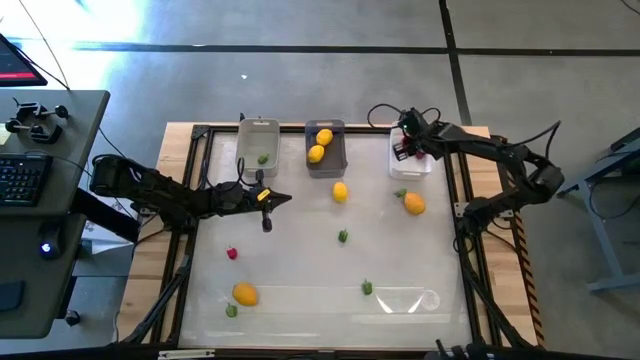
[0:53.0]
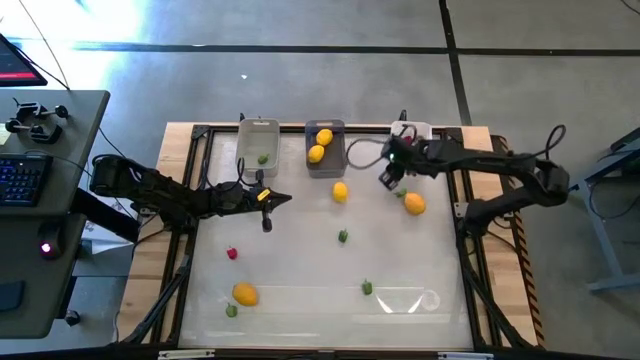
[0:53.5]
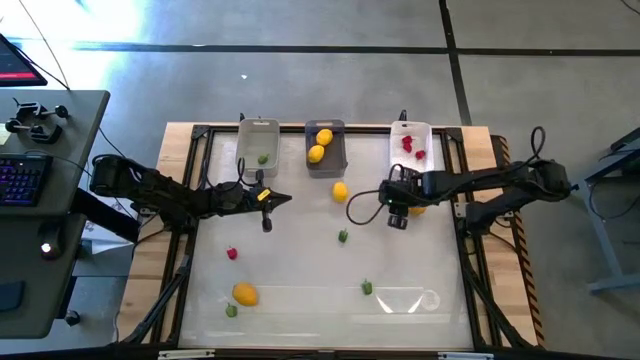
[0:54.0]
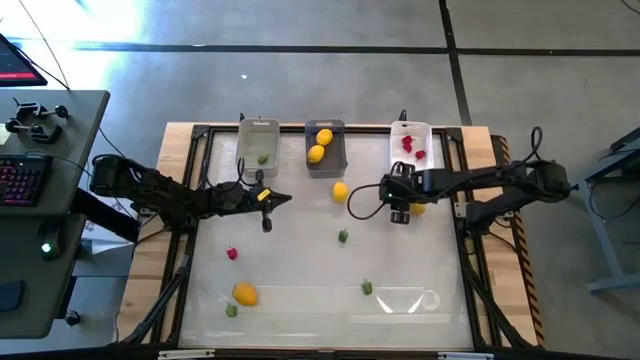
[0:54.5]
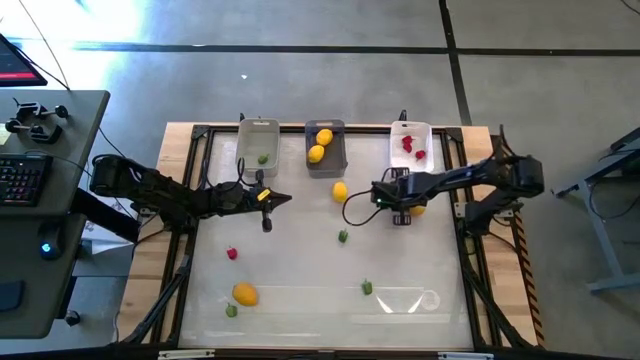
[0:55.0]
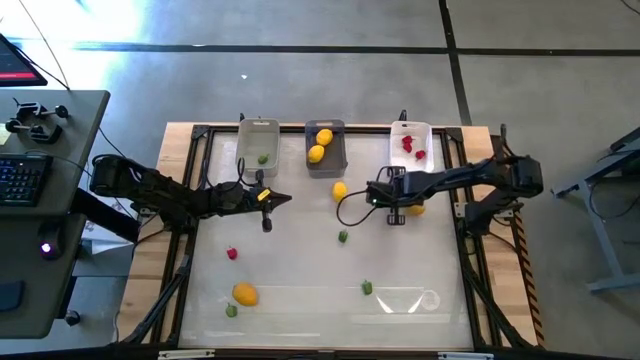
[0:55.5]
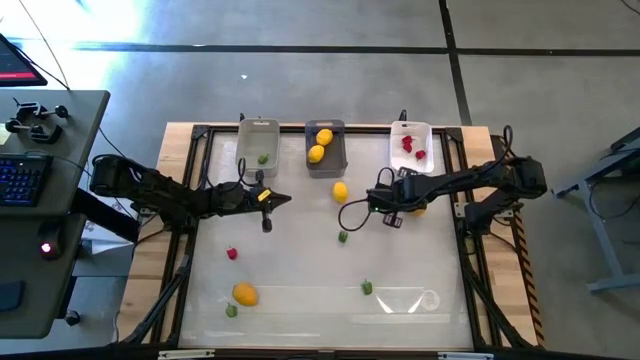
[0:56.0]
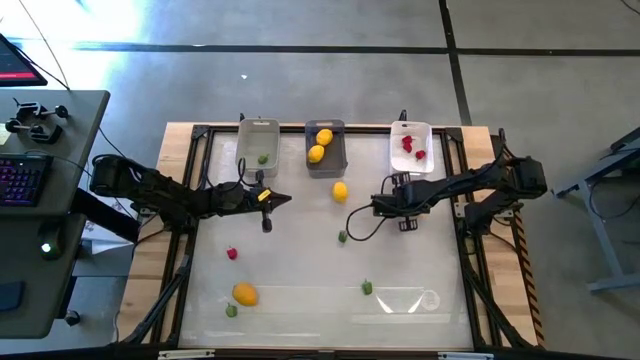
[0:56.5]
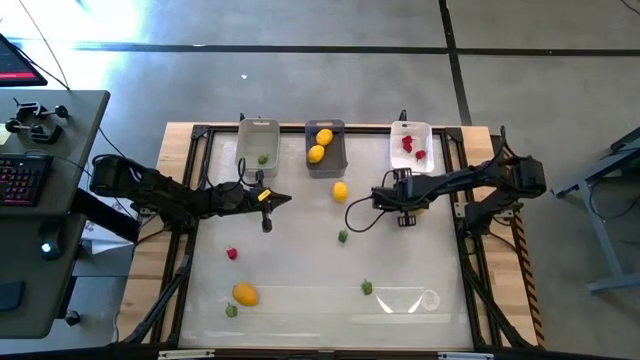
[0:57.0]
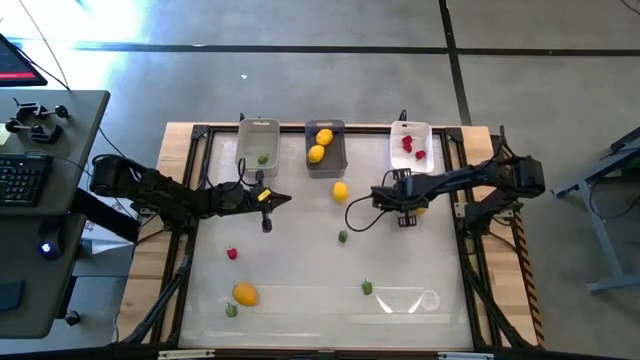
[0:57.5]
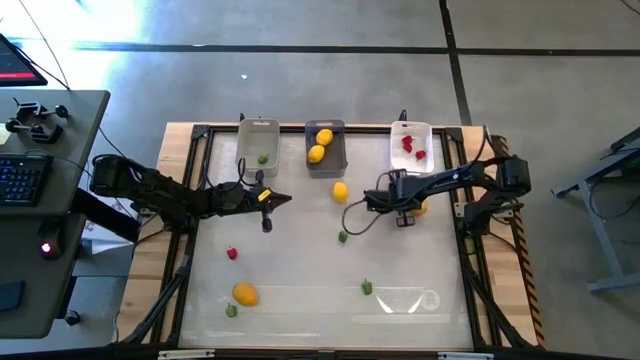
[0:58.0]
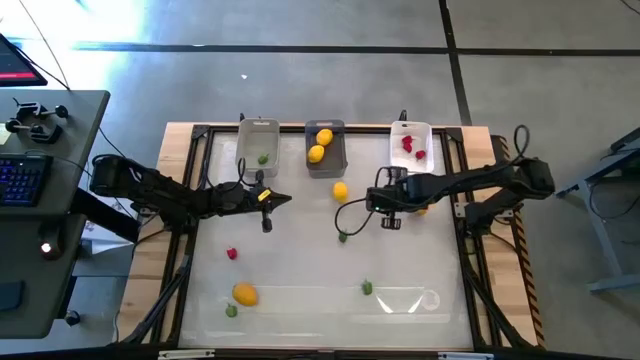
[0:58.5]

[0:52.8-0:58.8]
Task: Sort produce into baskets
Put the top right green bell pepper into the gray bin

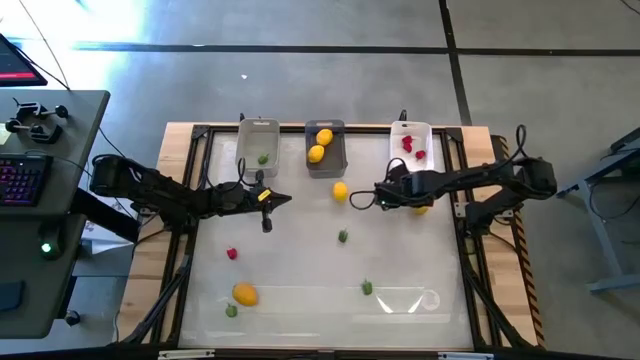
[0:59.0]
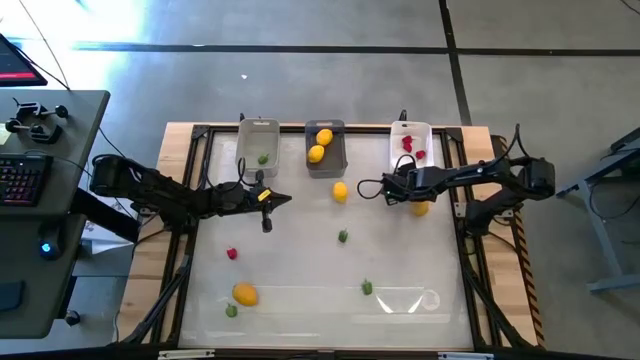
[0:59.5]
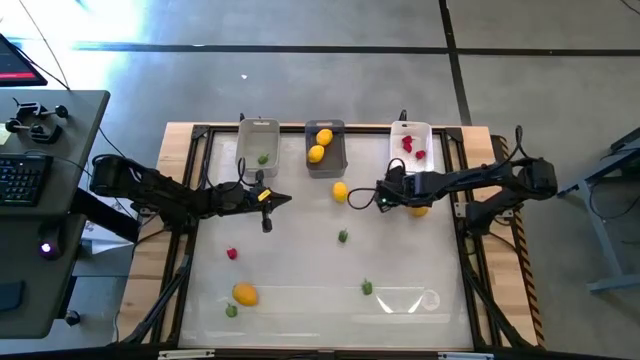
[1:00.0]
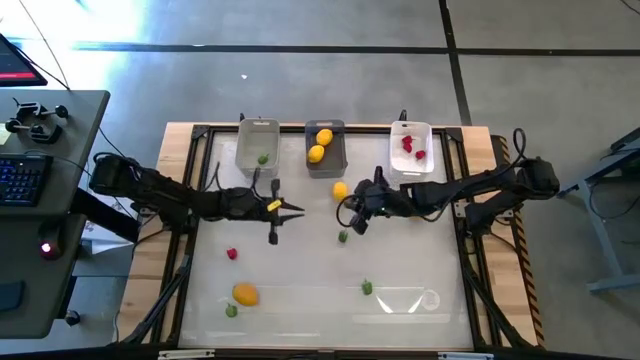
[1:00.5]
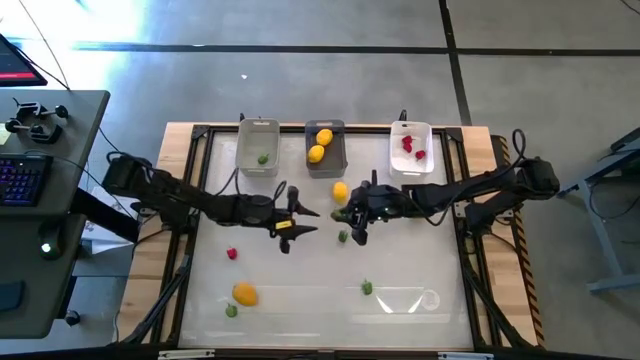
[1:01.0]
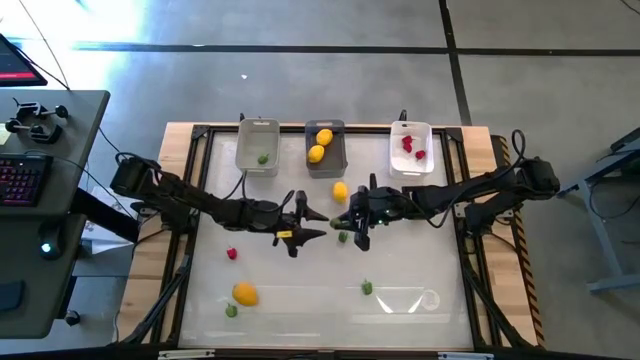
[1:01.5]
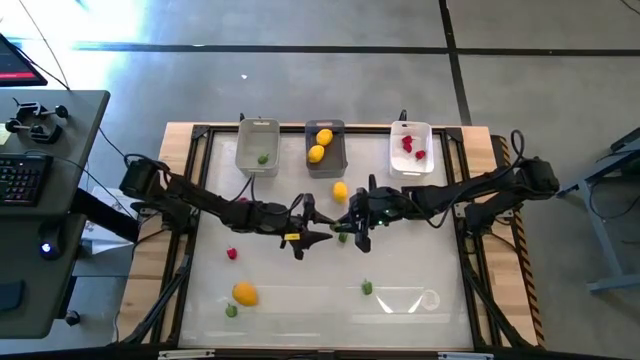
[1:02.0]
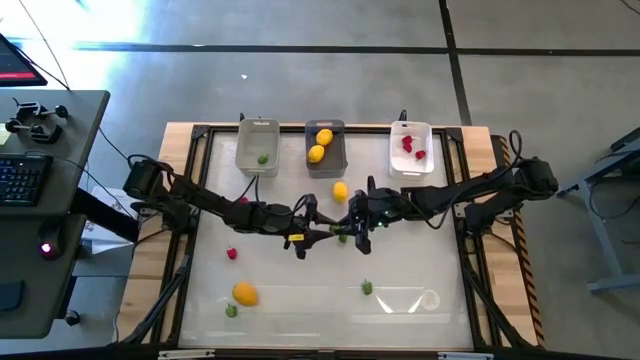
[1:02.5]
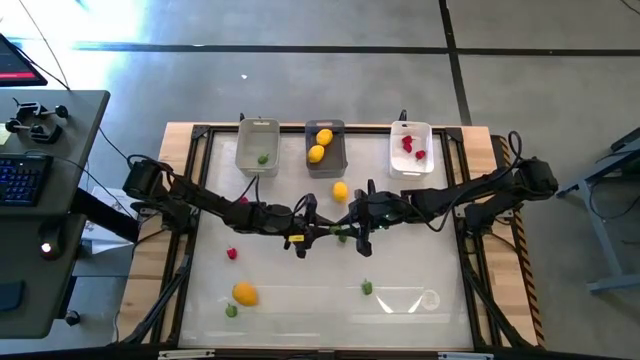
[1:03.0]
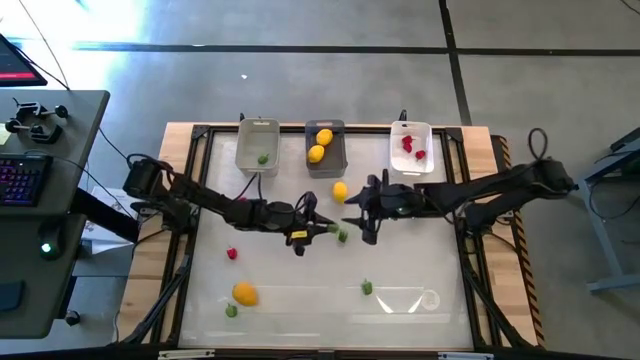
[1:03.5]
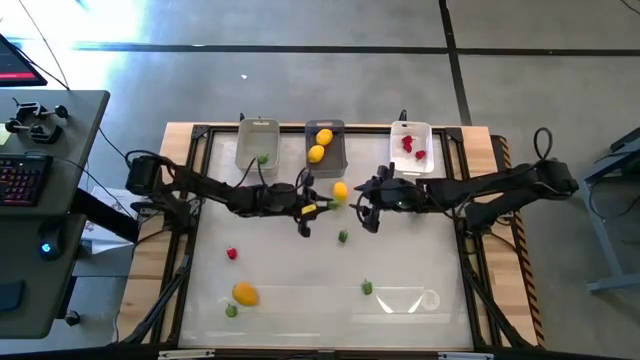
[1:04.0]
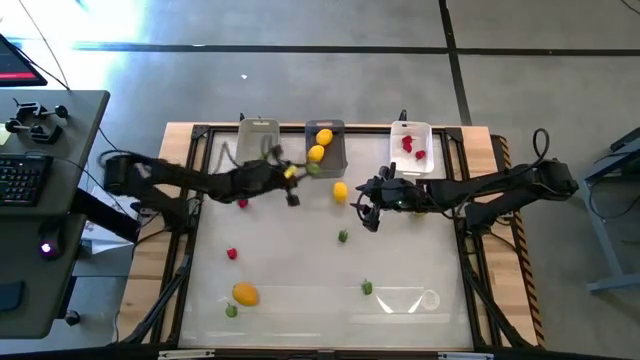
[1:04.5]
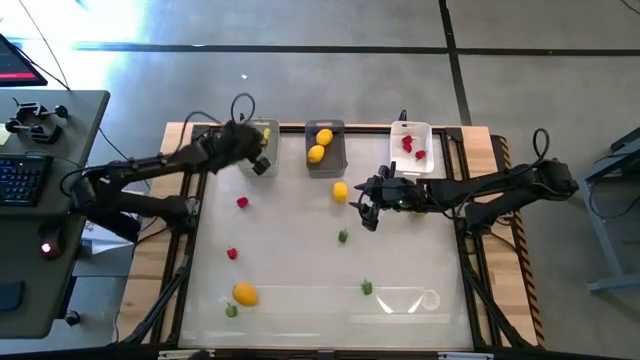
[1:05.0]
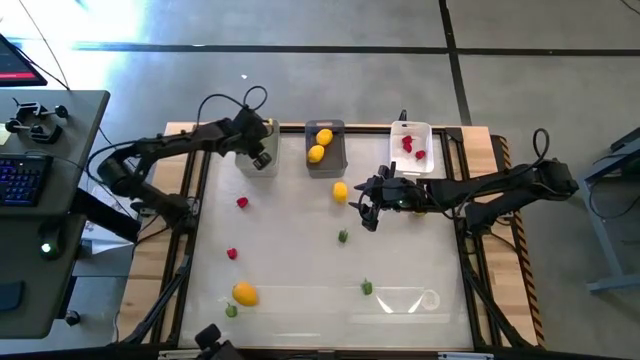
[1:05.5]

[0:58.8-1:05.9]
Put the top right green bell pepper into the gray bin

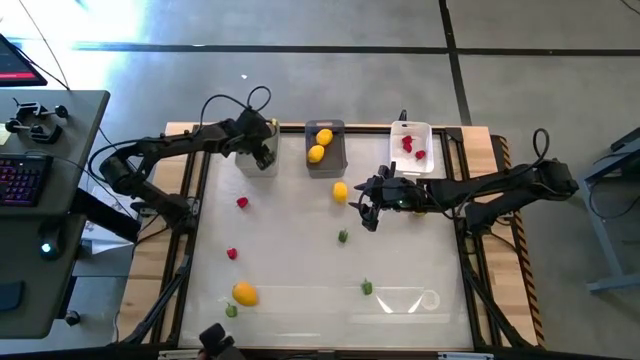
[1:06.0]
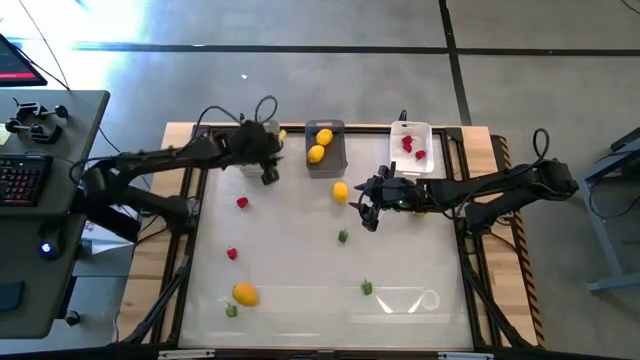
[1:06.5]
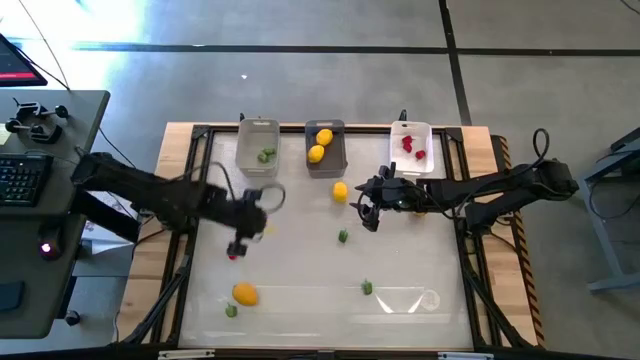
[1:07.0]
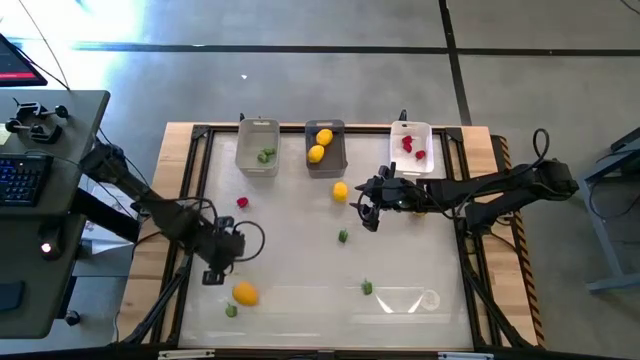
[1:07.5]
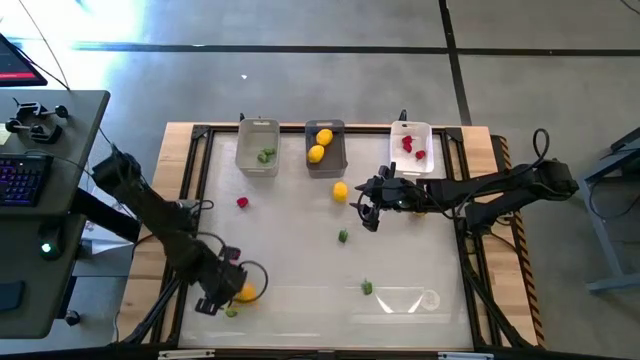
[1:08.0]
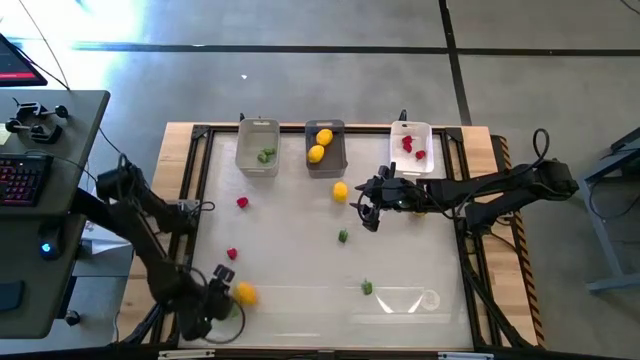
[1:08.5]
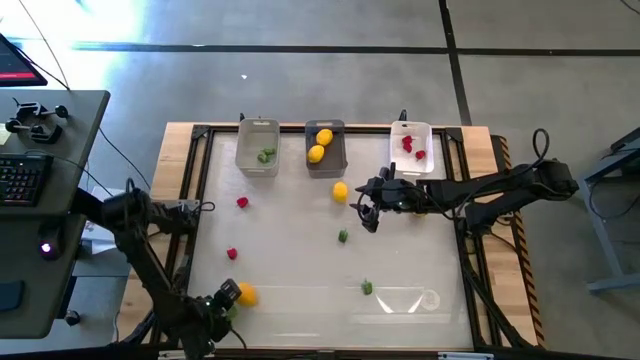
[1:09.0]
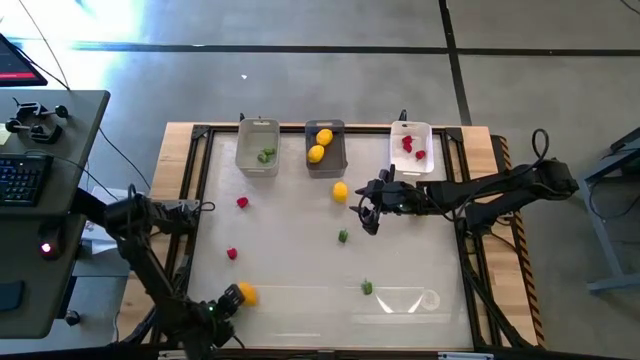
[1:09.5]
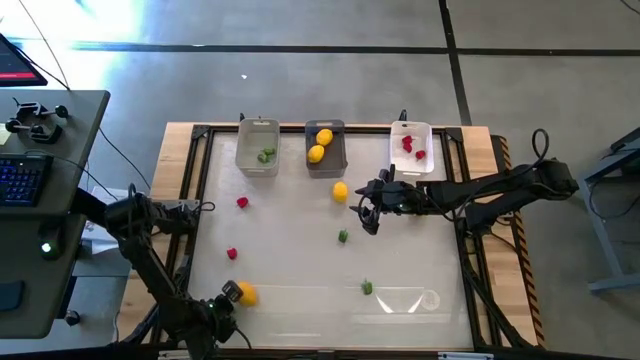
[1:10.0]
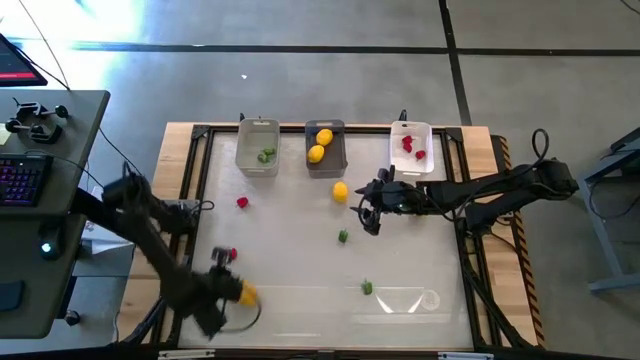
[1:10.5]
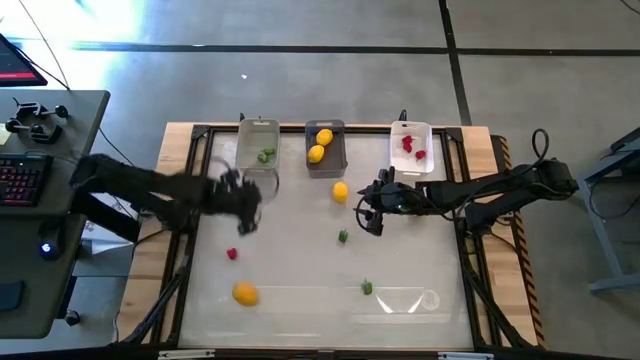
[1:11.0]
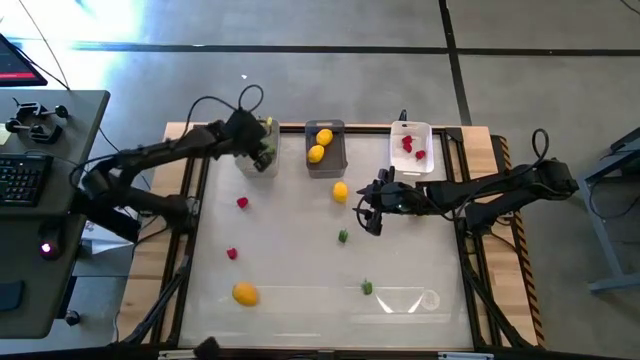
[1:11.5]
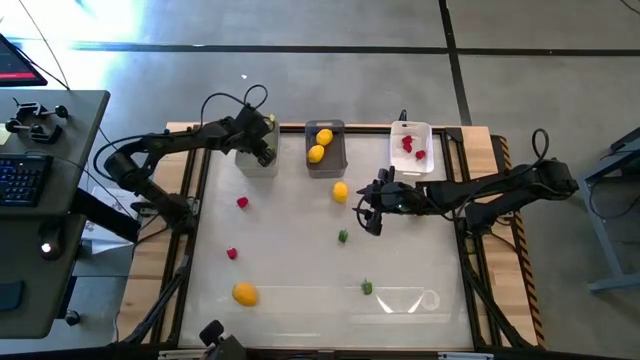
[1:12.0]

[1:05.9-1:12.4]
Put the bottom left green bell pepper into the gray bin

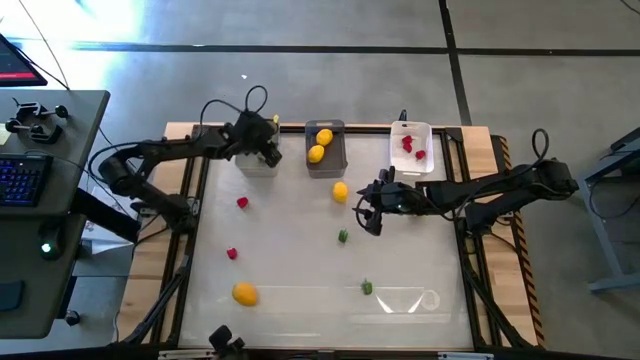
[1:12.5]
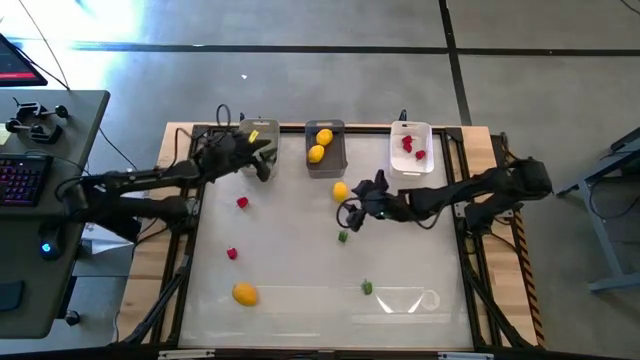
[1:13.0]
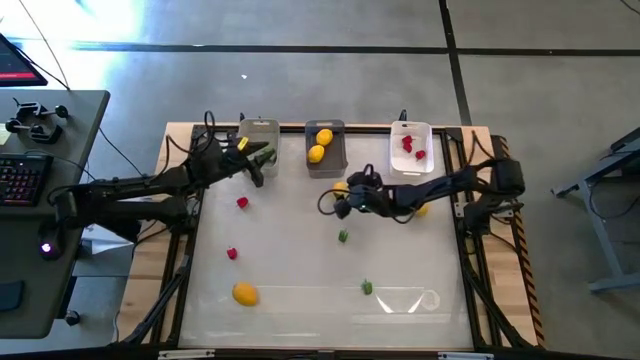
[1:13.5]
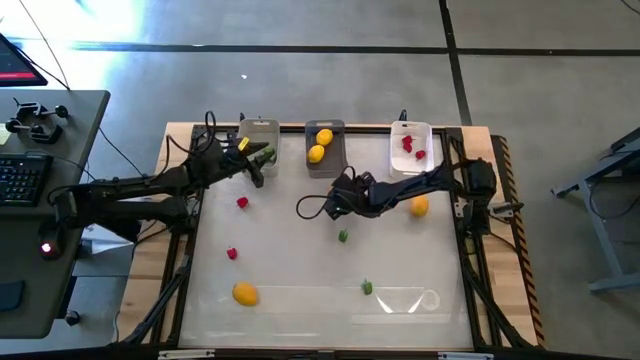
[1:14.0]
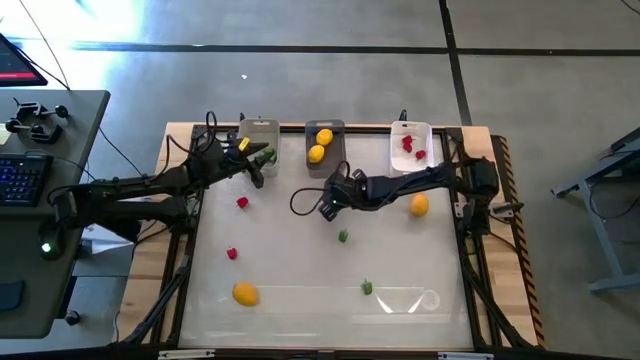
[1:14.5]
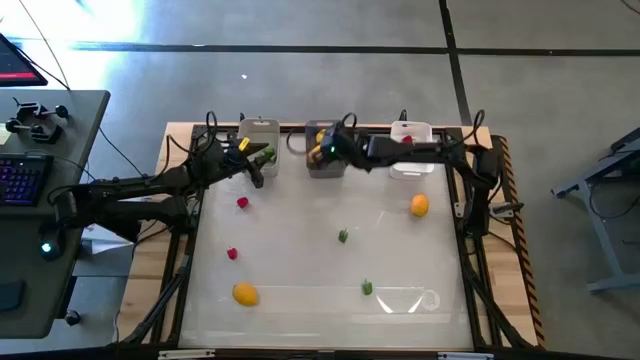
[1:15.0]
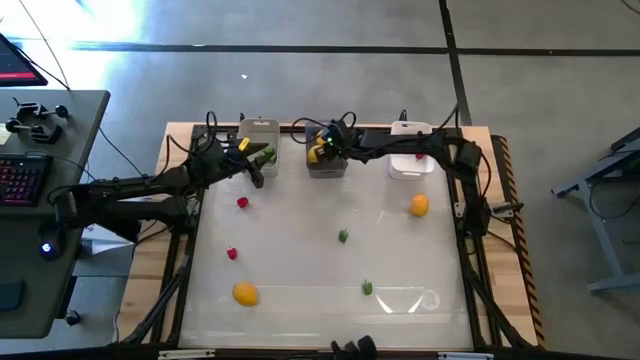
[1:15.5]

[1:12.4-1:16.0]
Put the lemon into the black bin
